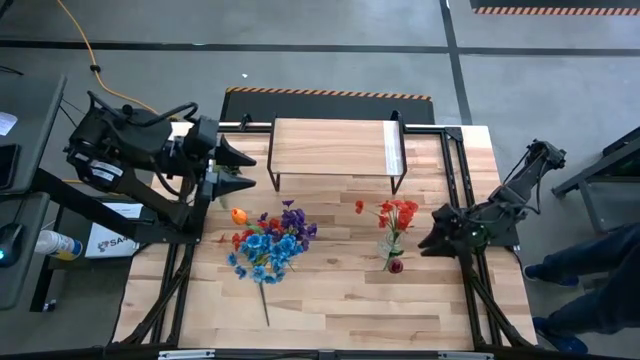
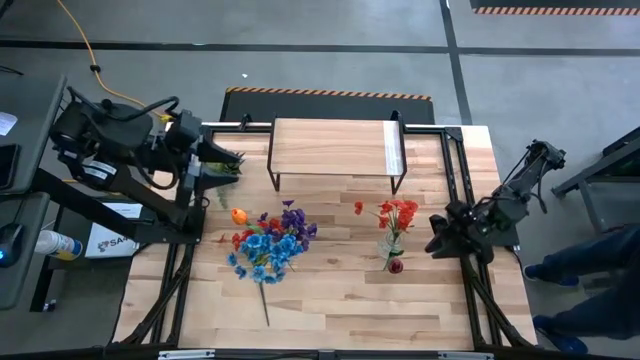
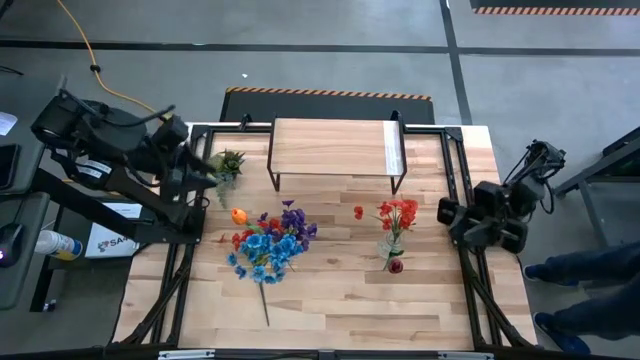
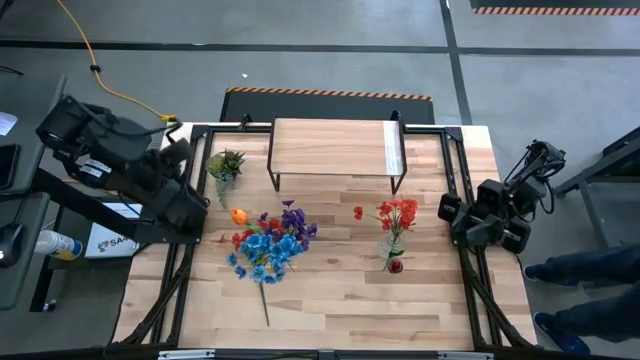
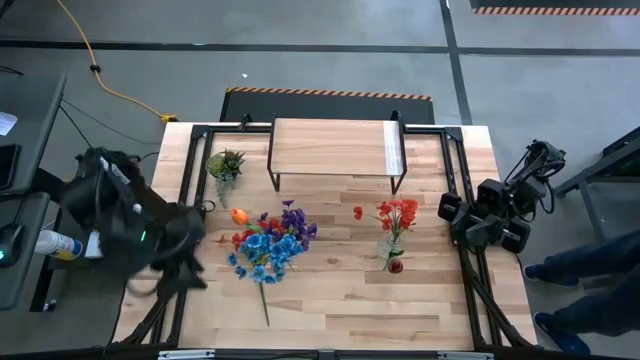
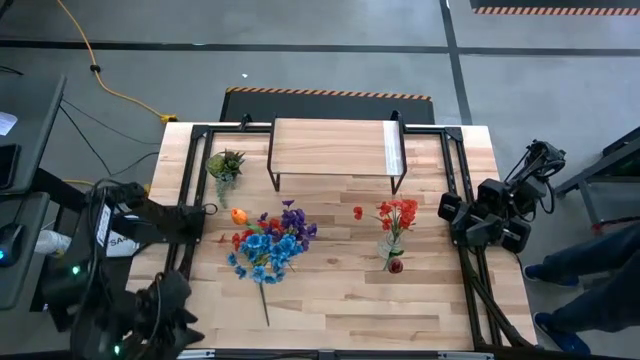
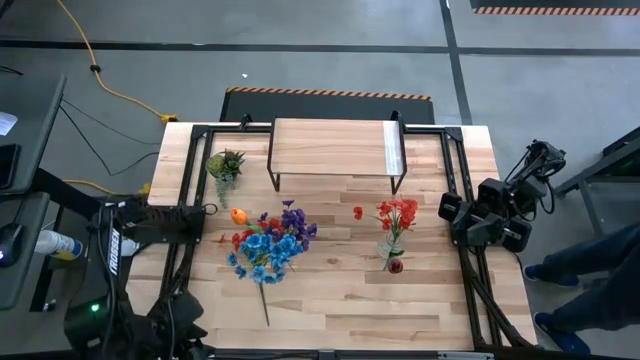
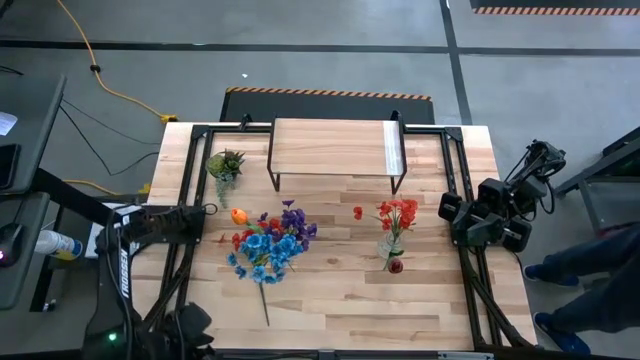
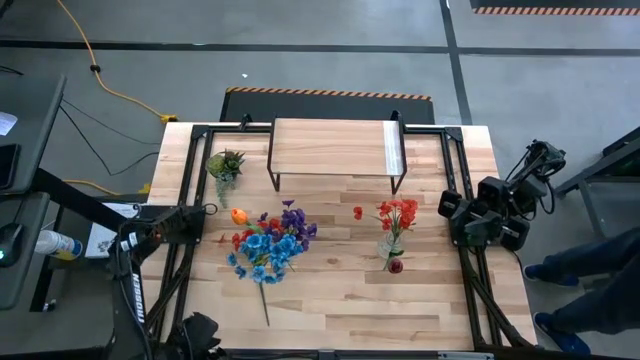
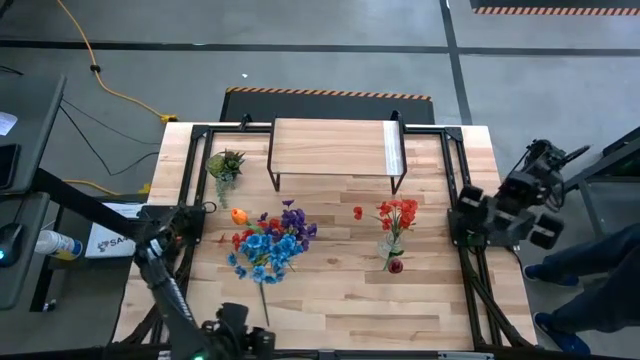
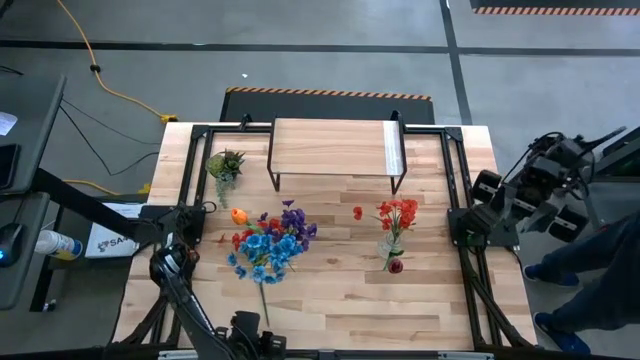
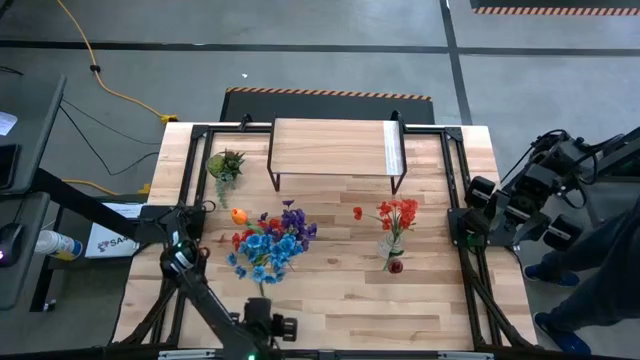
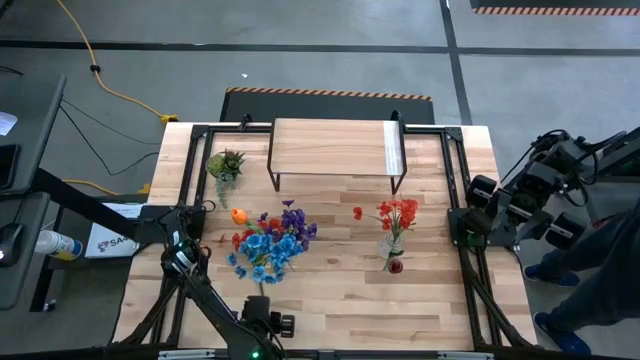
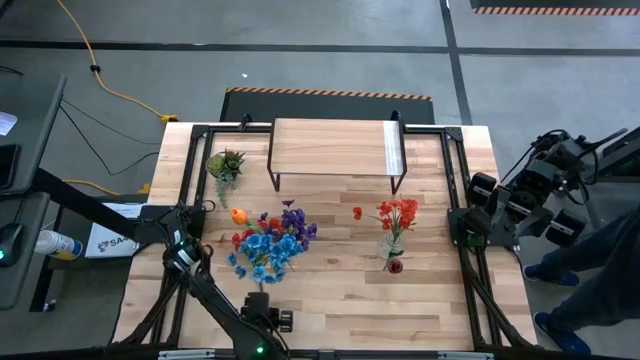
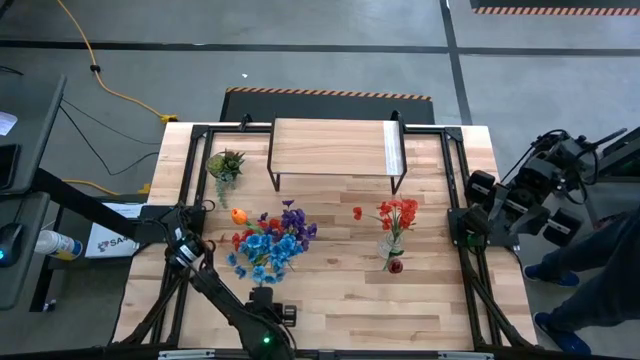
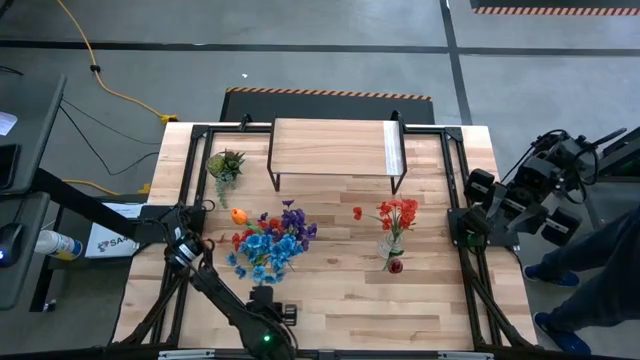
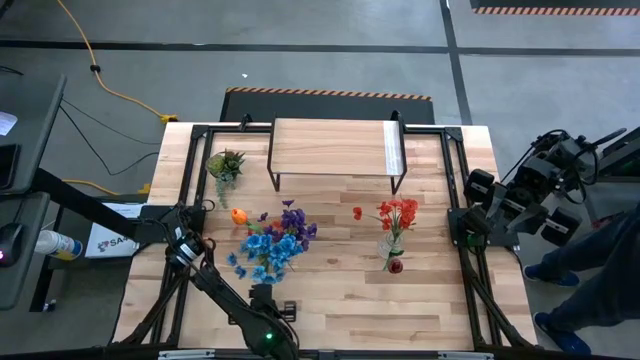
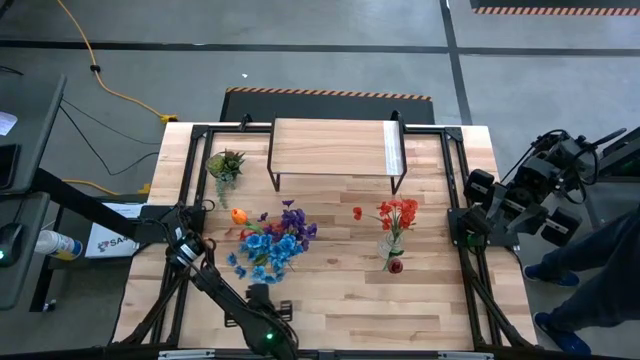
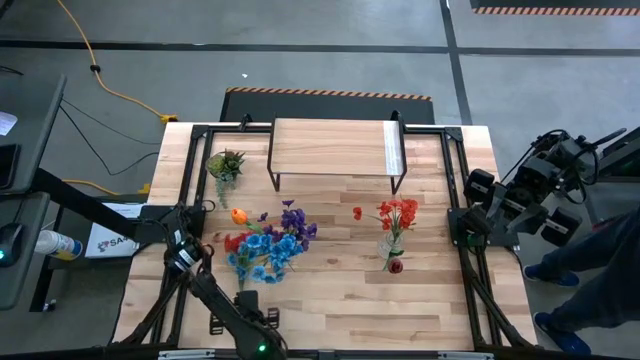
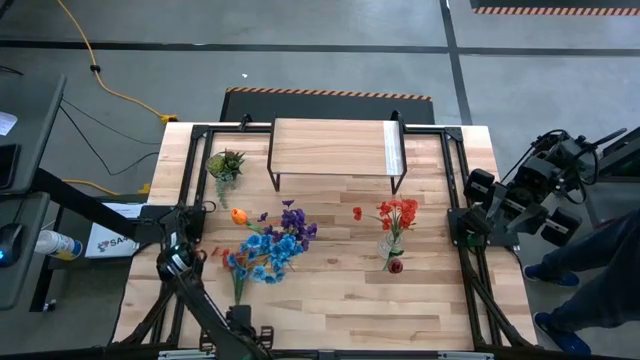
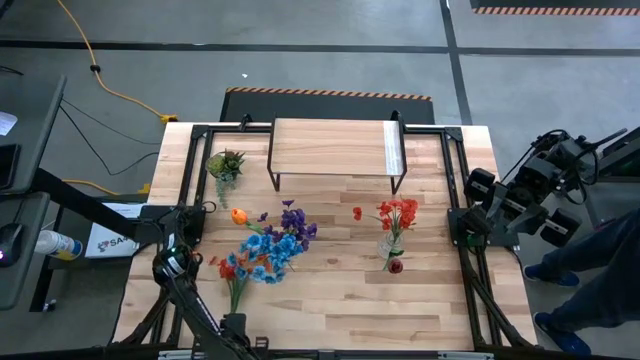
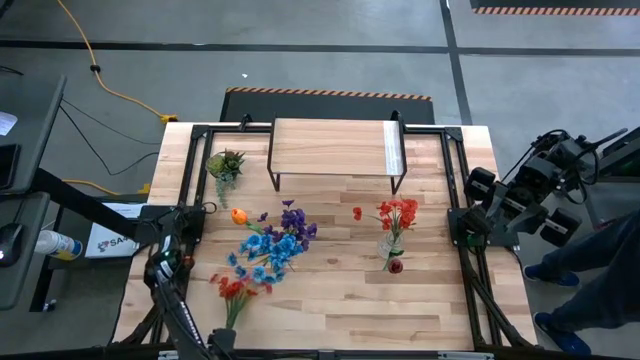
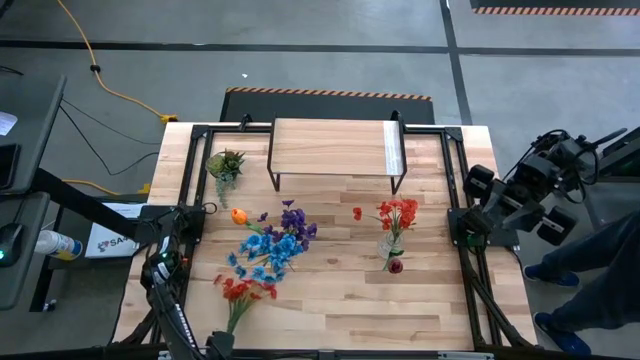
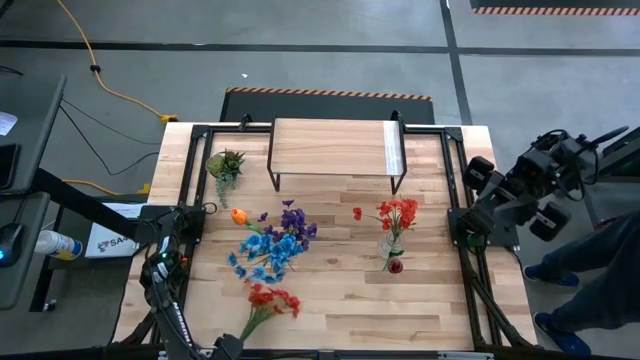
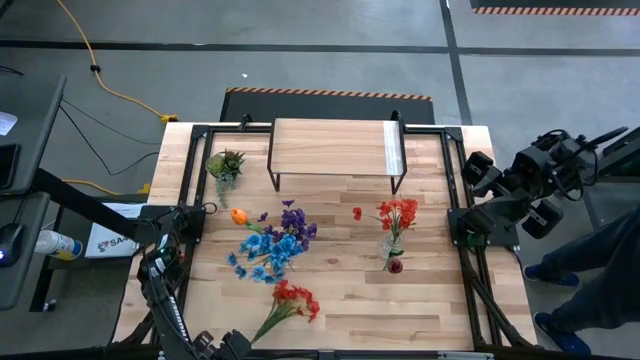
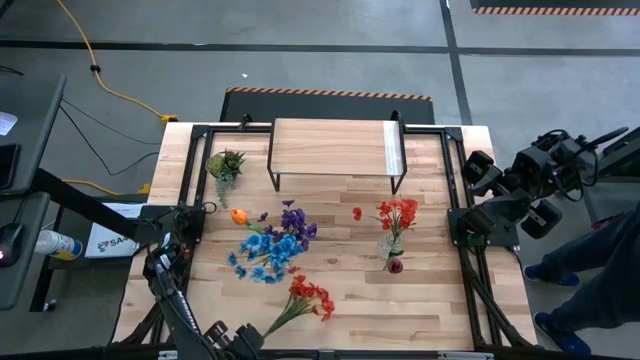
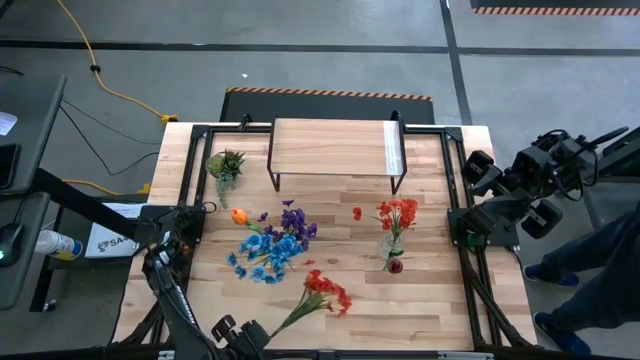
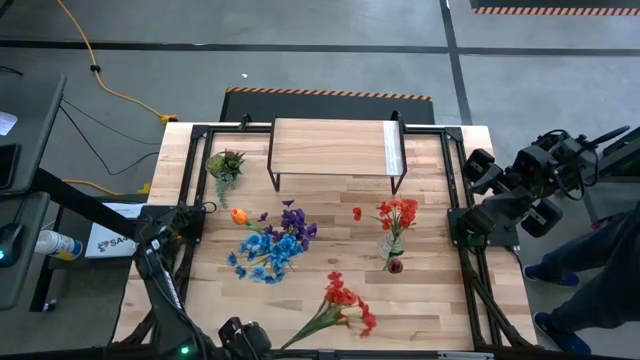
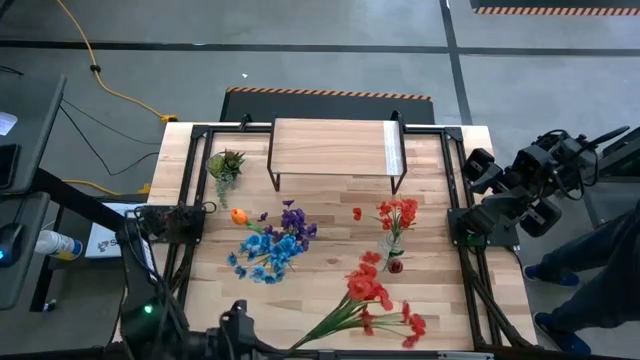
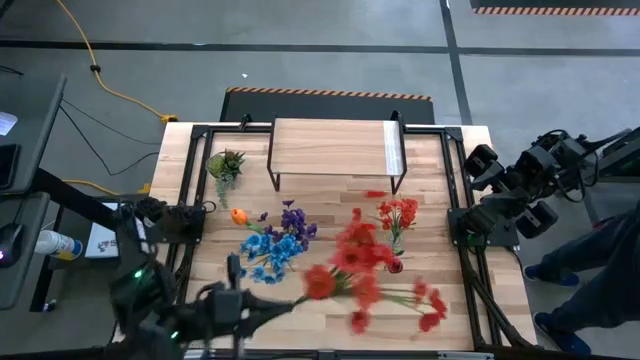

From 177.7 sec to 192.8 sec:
Task: Pick and place flowers into a vace then onto a shelf
Put the red flower into the right transparent bin

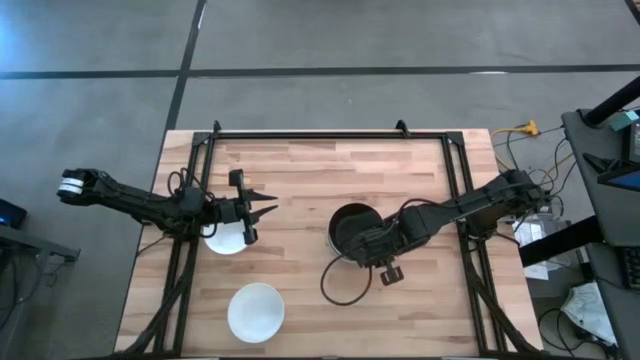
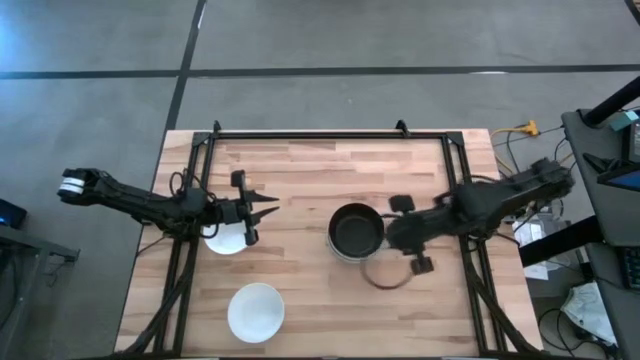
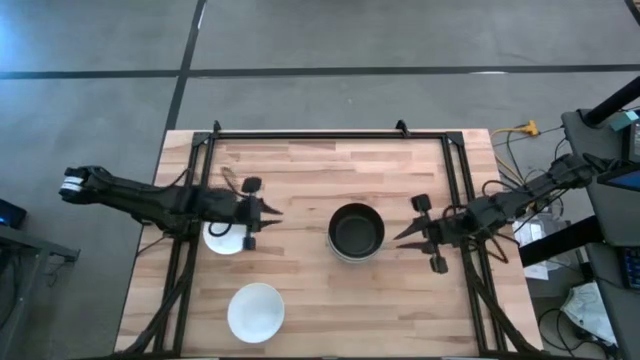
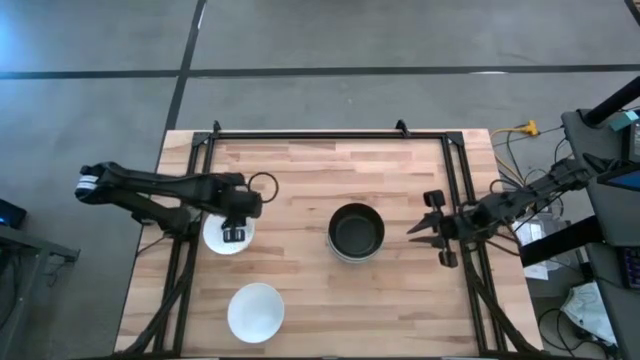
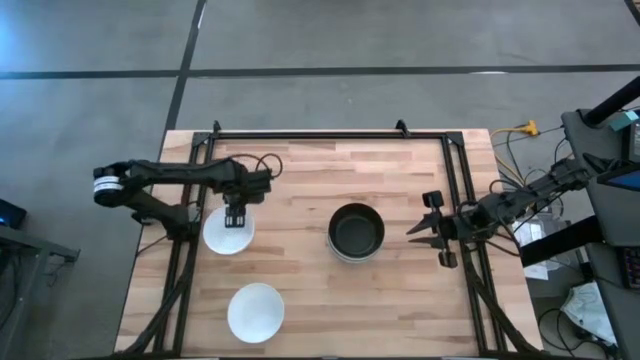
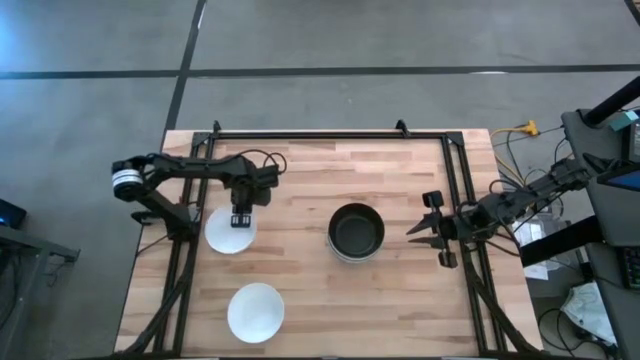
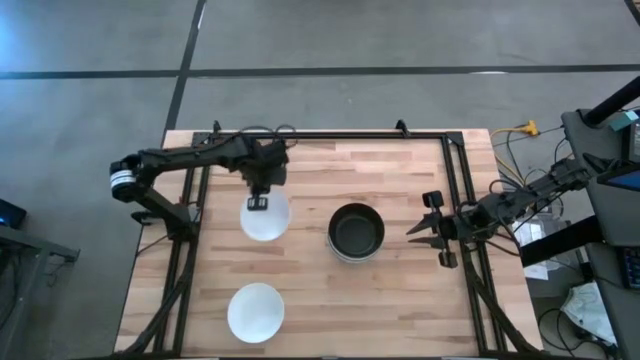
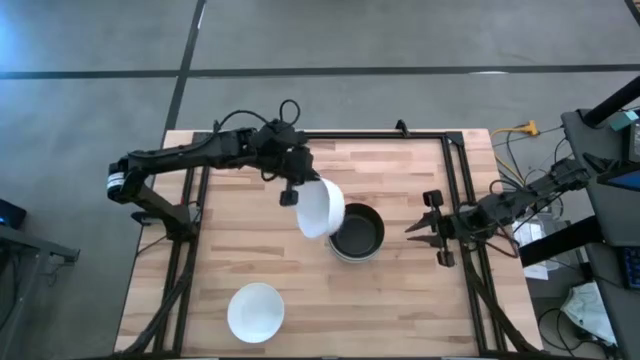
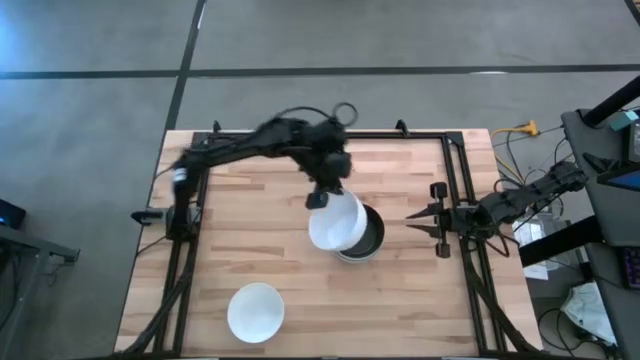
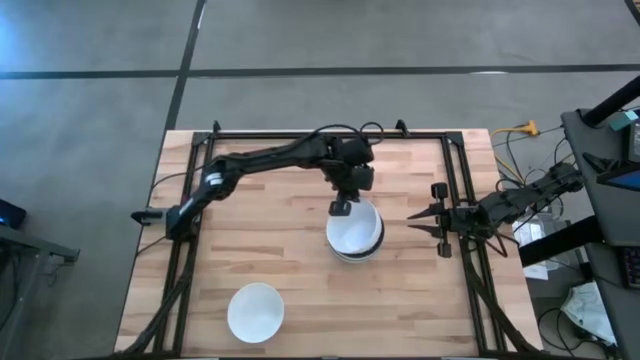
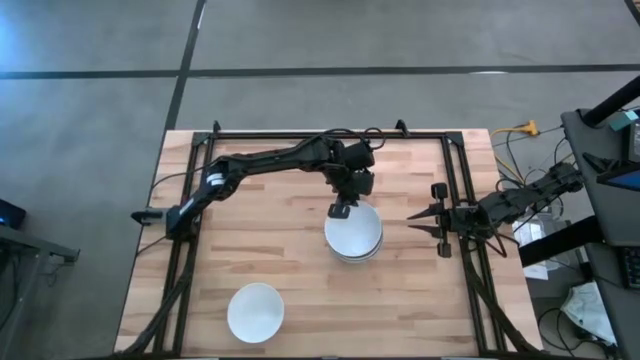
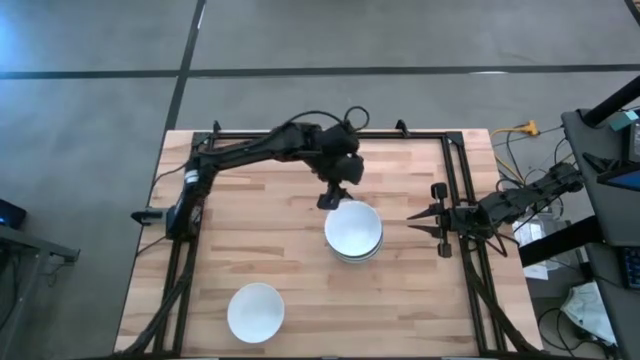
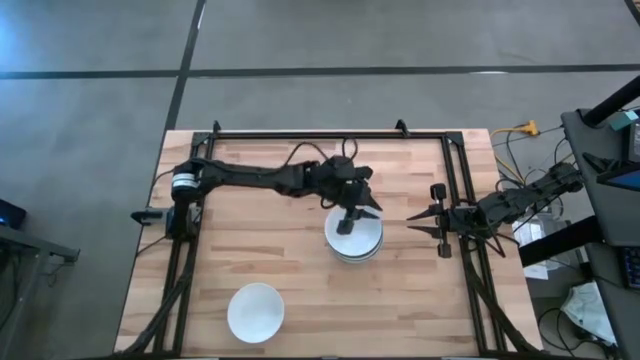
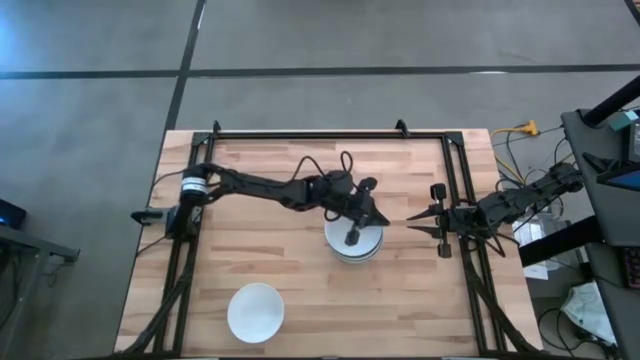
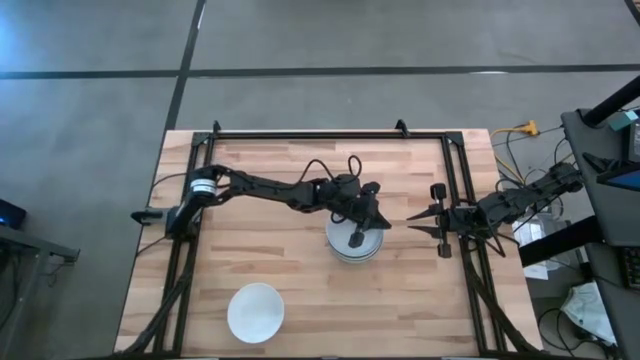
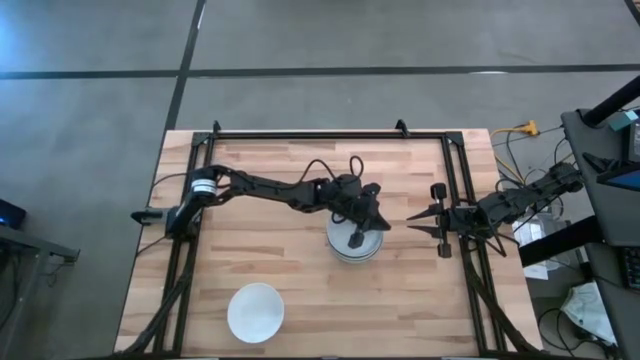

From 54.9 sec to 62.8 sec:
Task: Nest bowls inside each other
Stack the white bowl on top of the black bowl
